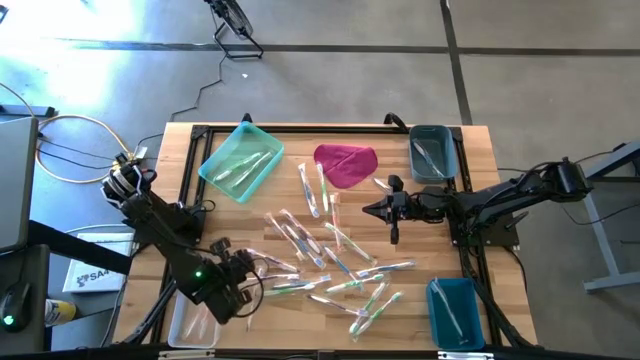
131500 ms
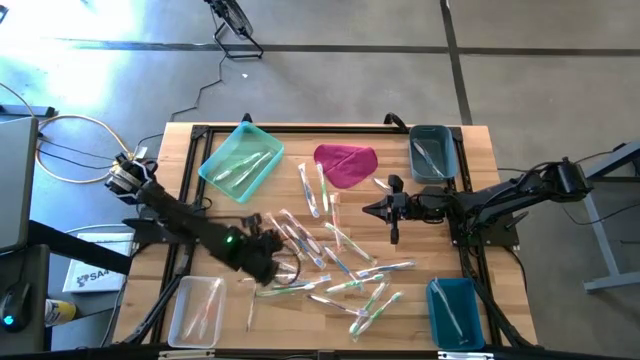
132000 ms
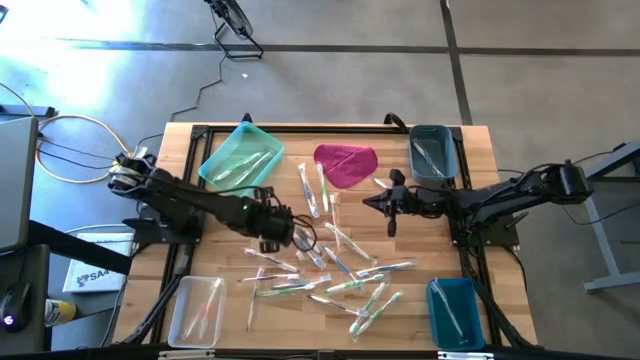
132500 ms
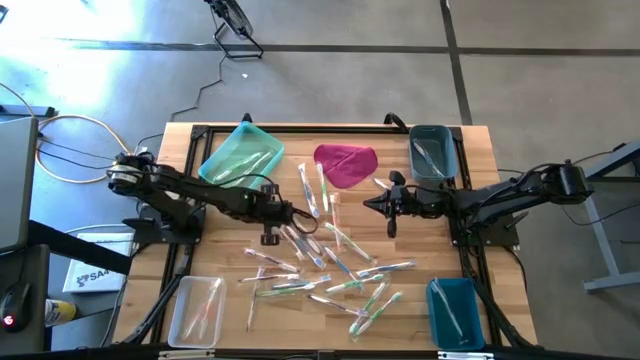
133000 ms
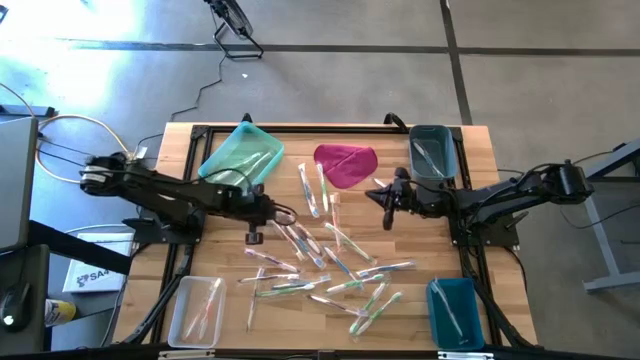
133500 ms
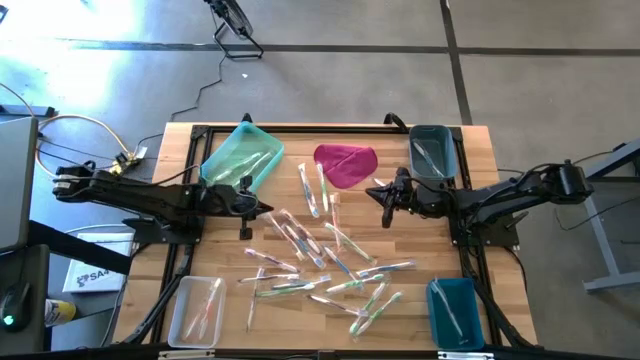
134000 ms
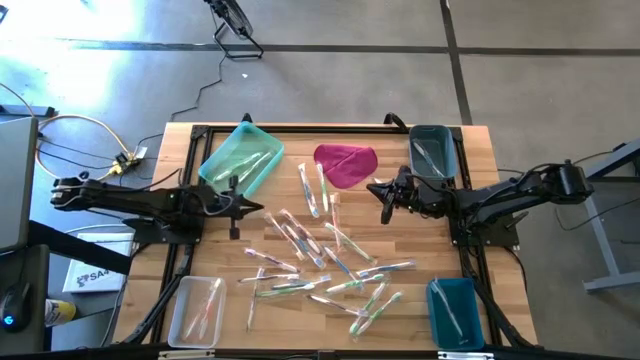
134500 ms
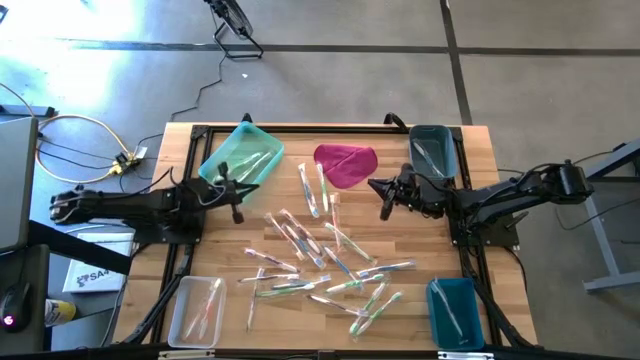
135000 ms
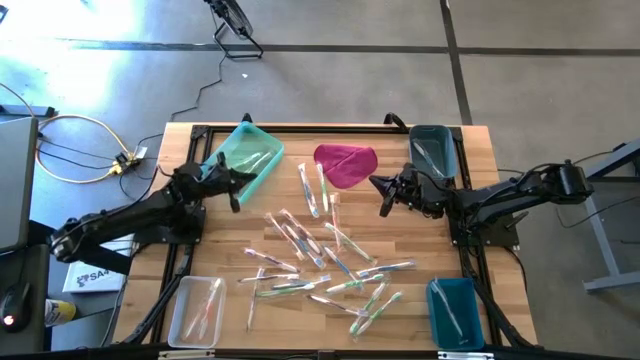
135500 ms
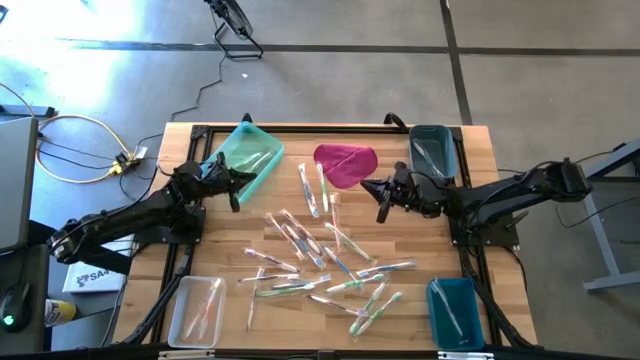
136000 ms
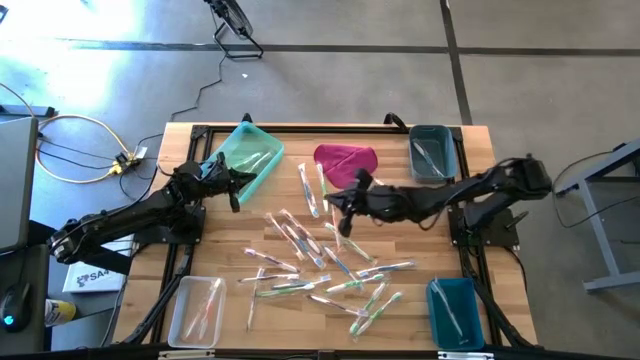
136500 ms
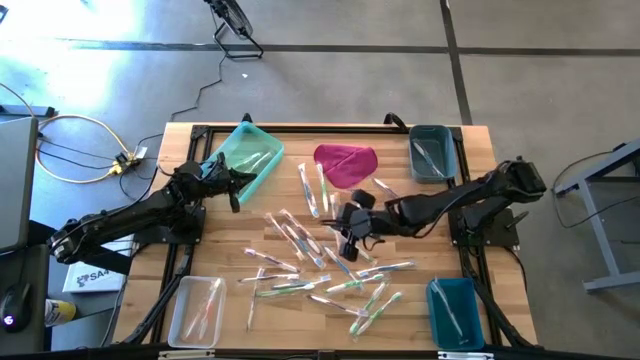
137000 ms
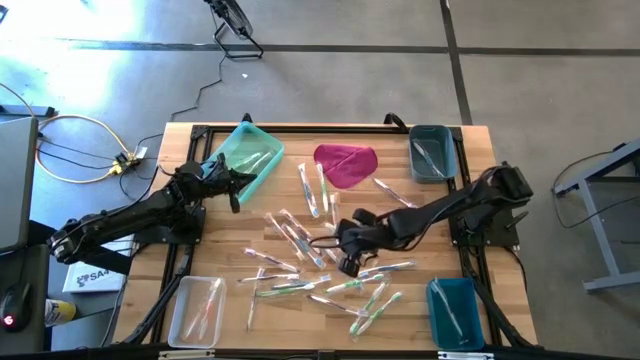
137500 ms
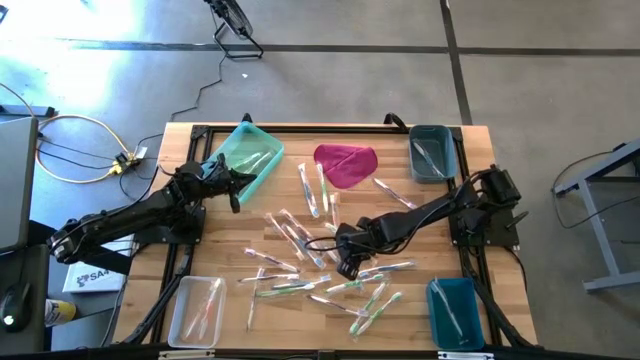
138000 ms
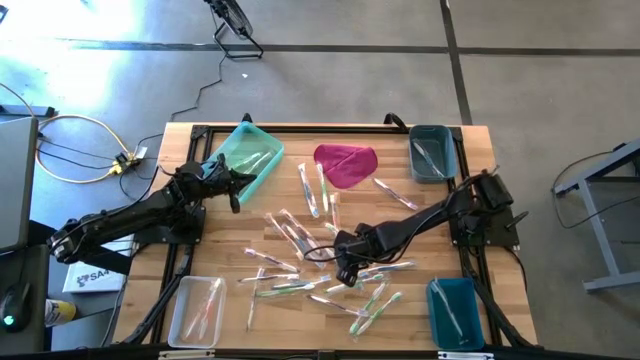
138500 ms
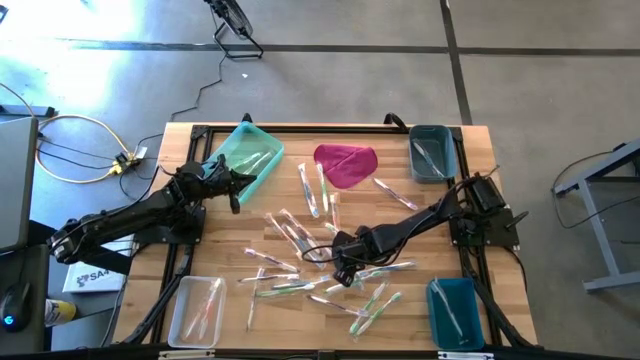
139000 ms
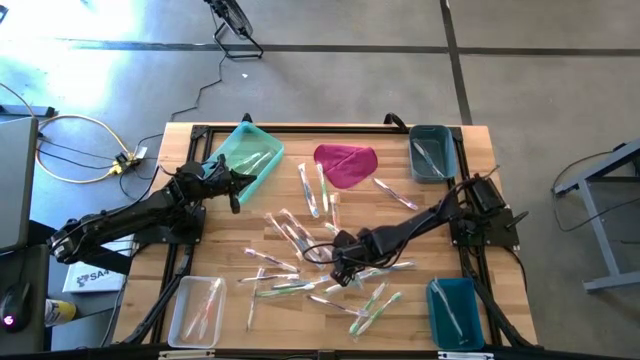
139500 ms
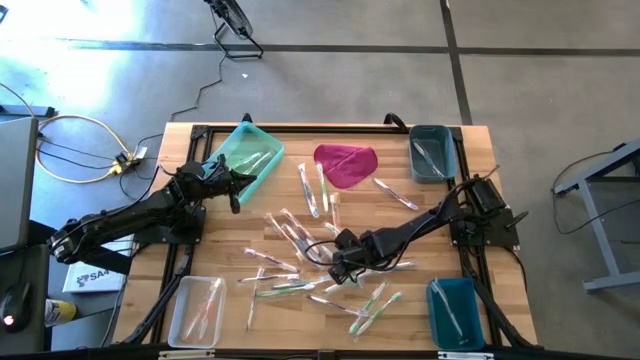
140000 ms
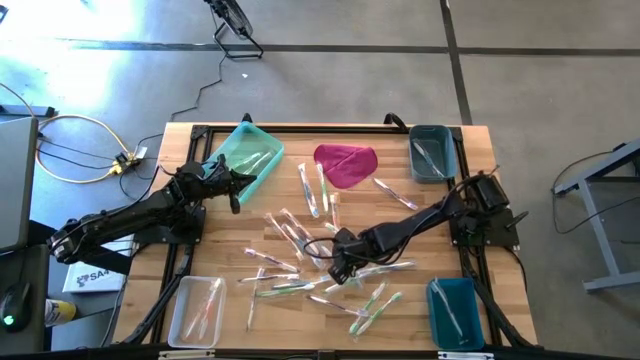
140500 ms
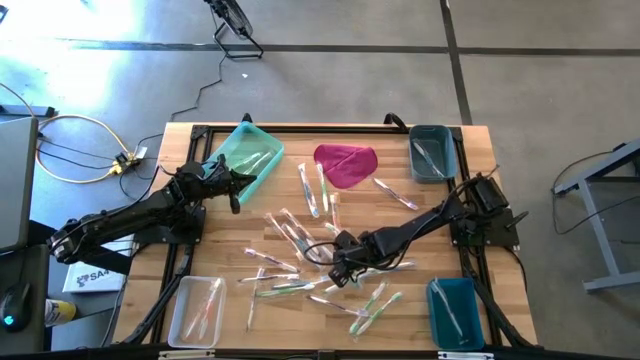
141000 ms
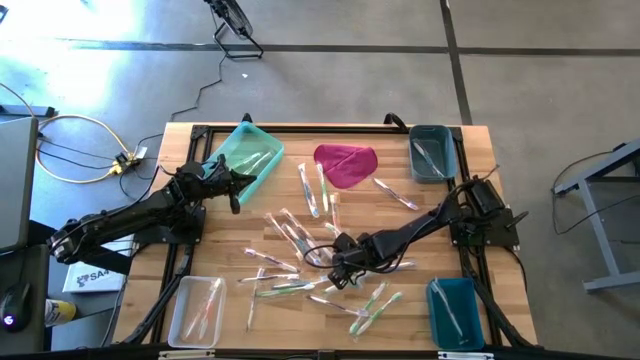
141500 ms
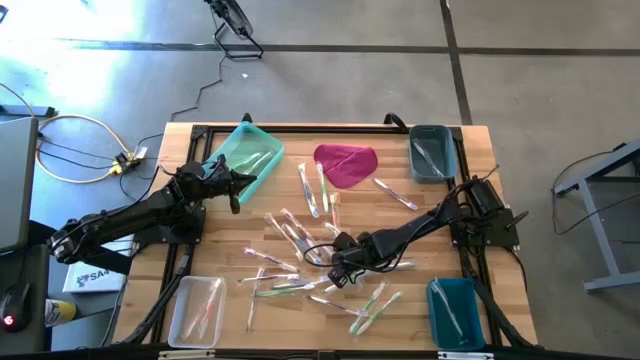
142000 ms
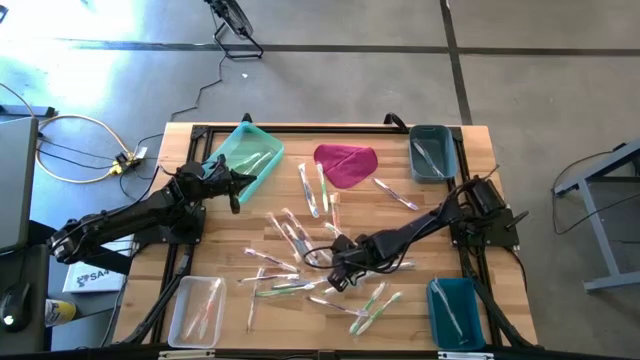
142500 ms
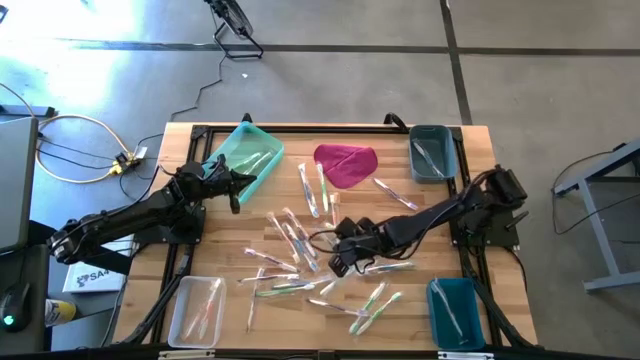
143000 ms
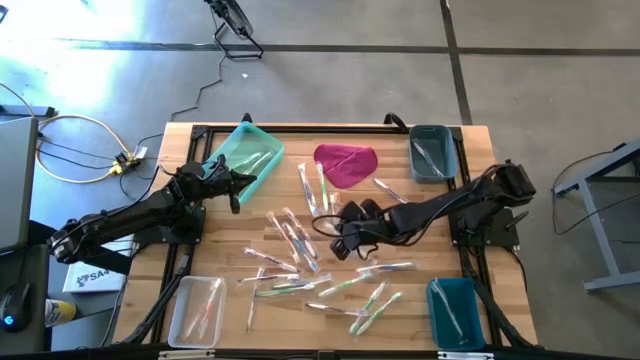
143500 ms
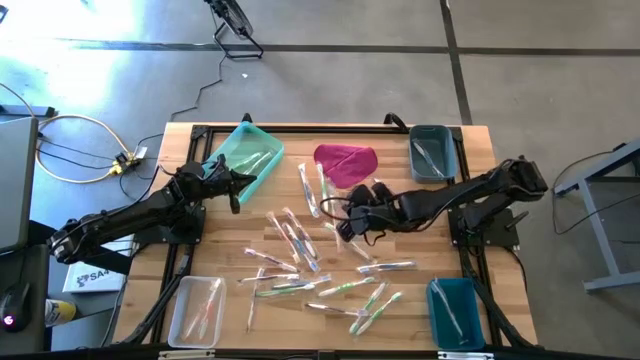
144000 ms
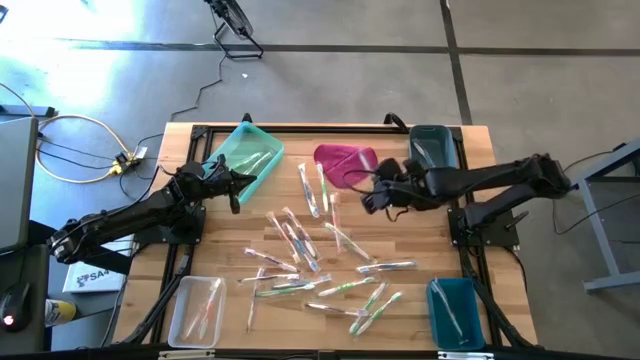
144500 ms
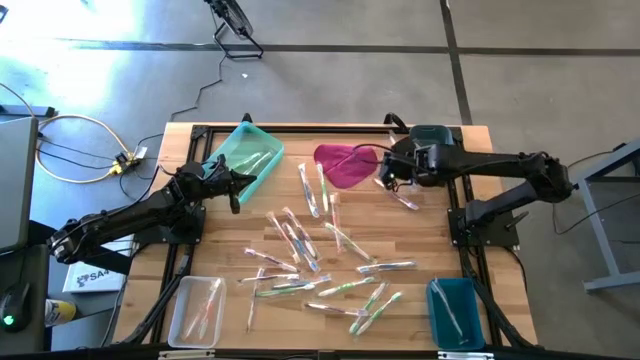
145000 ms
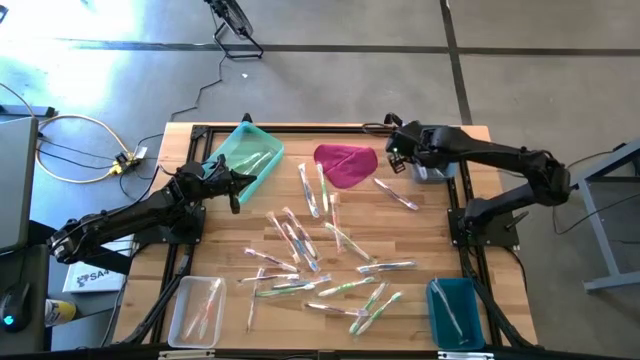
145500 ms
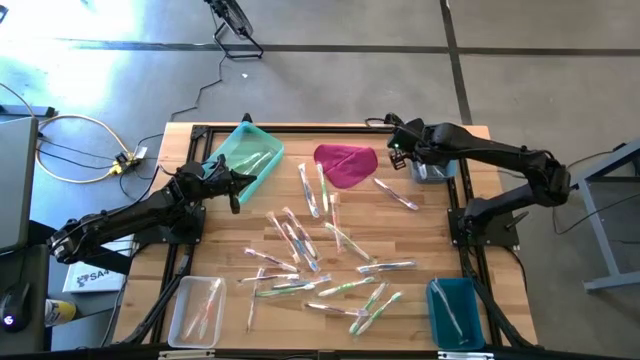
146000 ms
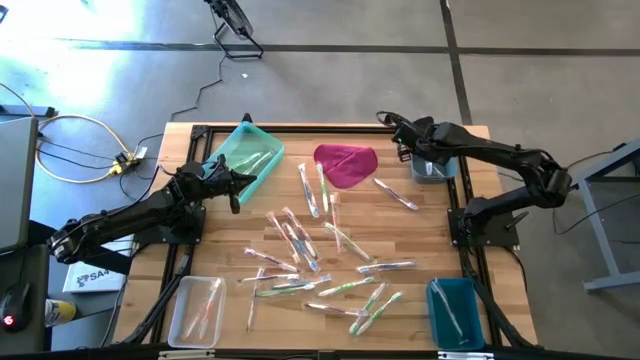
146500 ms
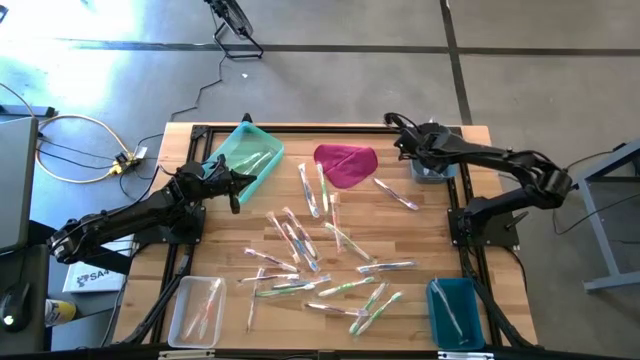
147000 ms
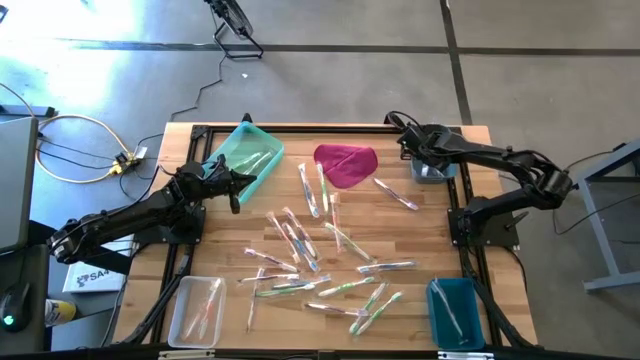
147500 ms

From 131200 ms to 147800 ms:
Task: Pick & Place Toothbrushes
Put the blue toothbrush to the light blue bin

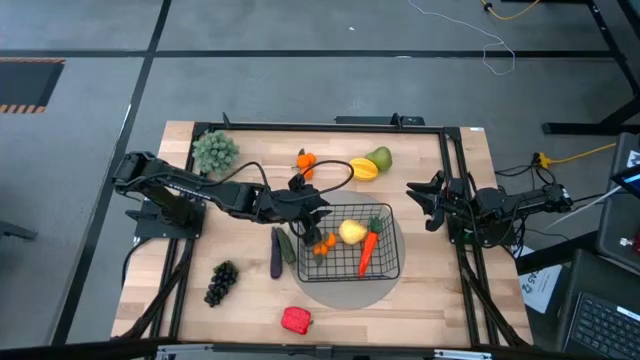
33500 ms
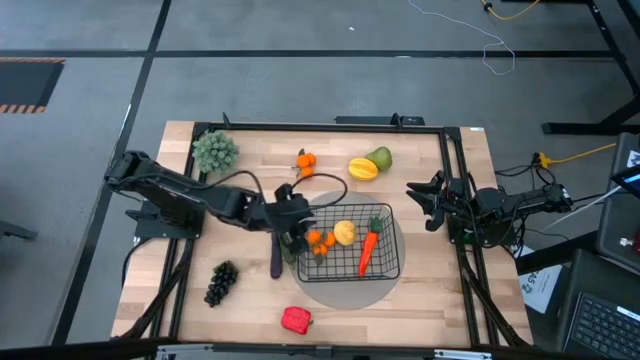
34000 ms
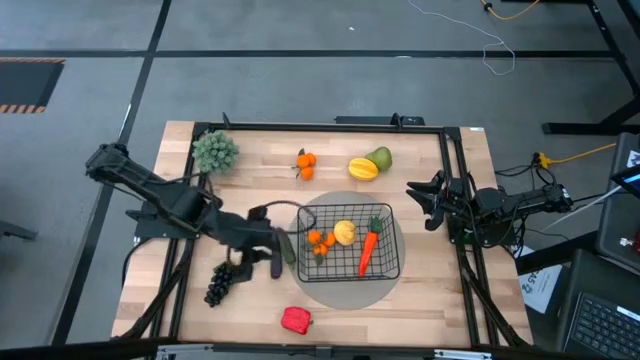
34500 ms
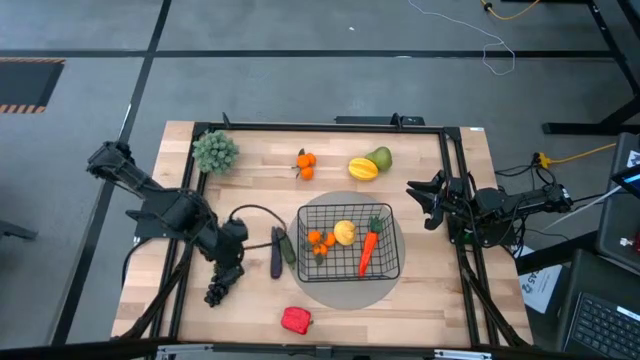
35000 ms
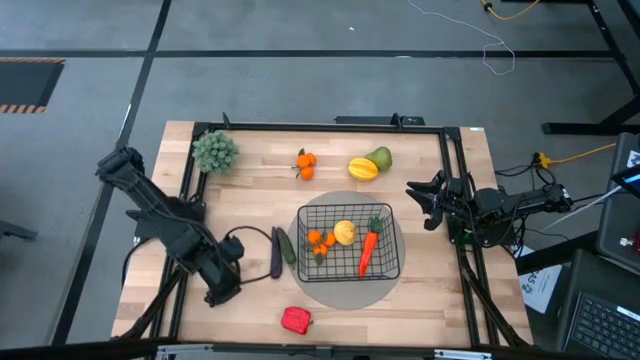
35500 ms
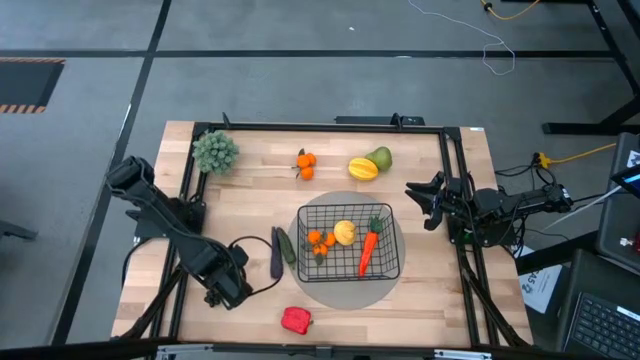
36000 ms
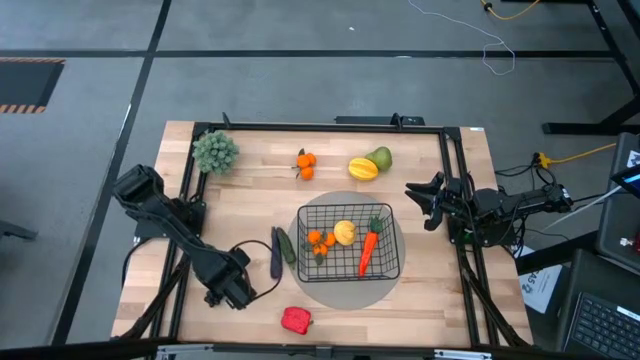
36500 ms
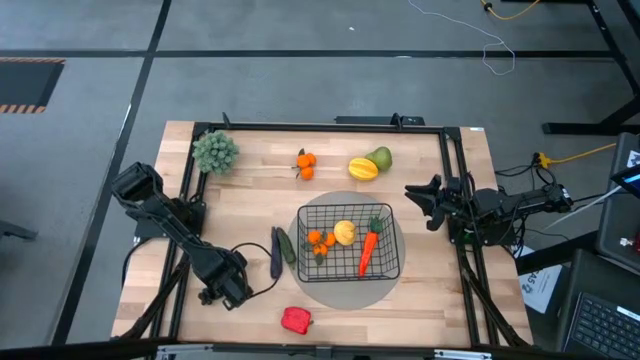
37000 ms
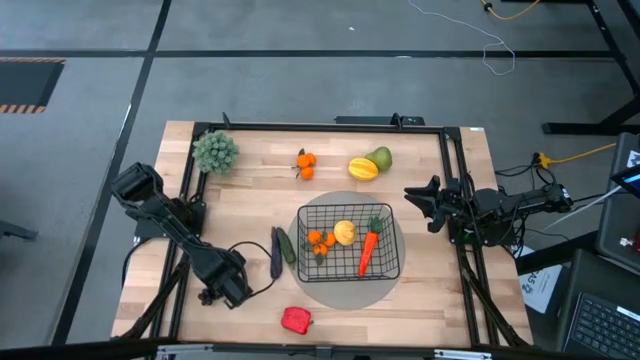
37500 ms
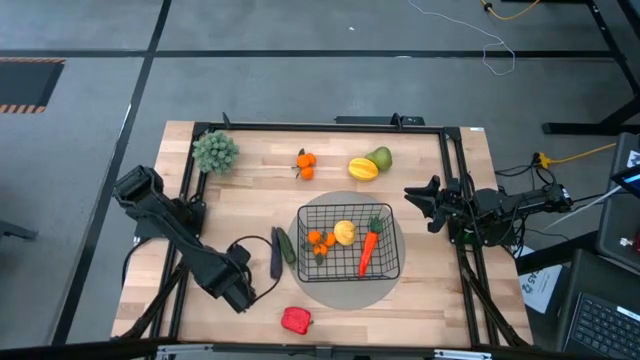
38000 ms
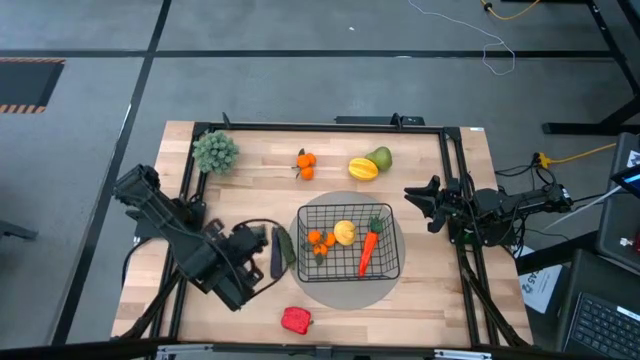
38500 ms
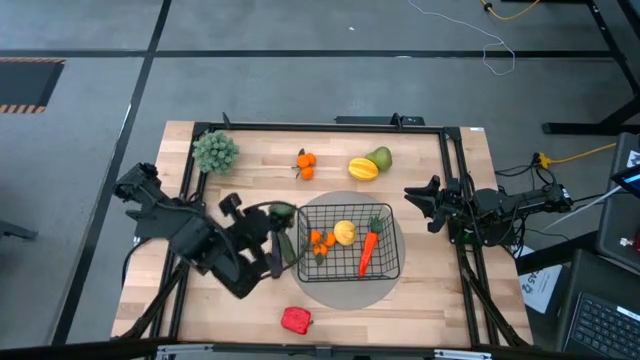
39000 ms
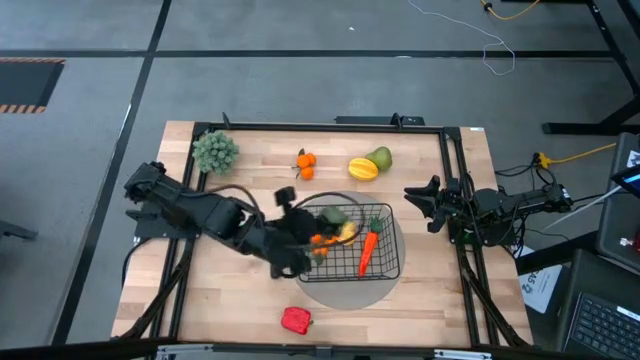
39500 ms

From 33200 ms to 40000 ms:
Task: Build produce basket
Put the black grapes into the black wire basket
